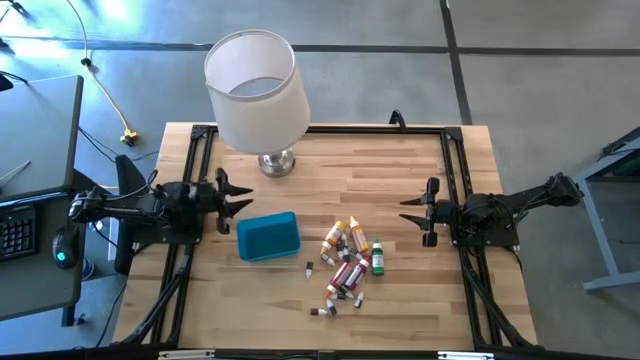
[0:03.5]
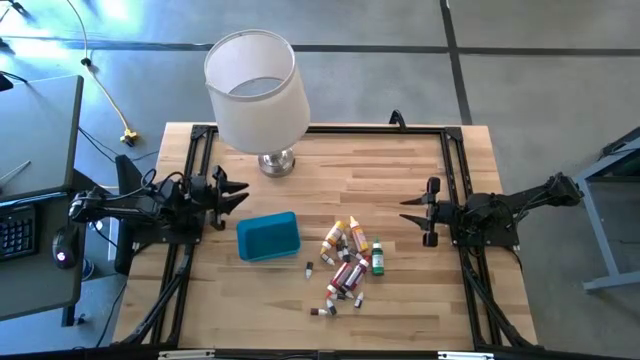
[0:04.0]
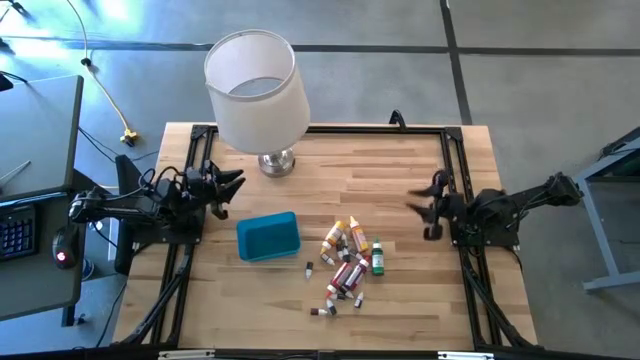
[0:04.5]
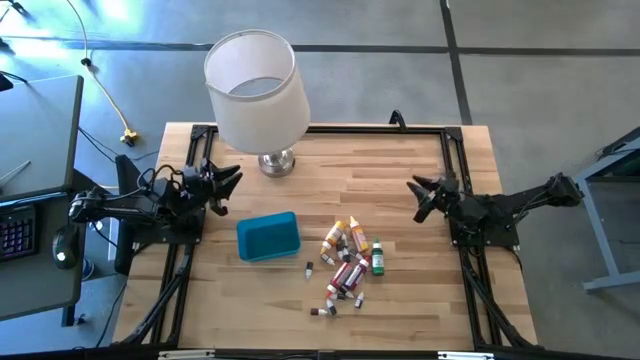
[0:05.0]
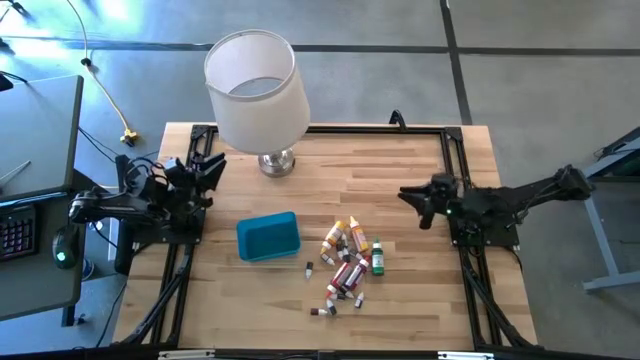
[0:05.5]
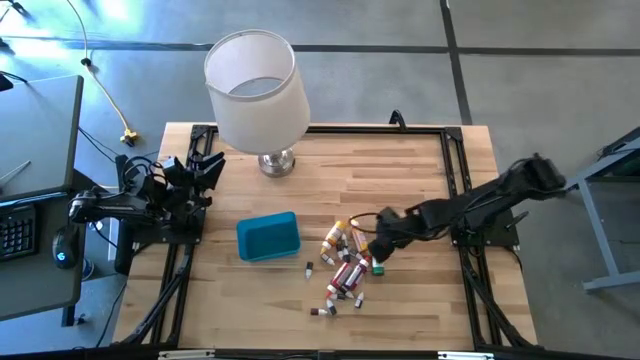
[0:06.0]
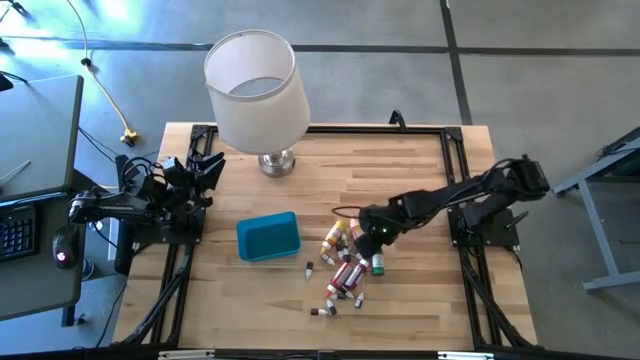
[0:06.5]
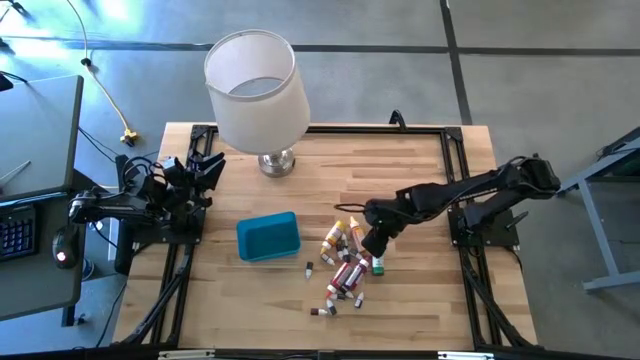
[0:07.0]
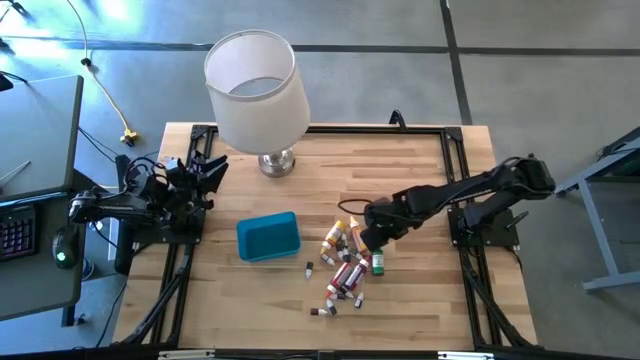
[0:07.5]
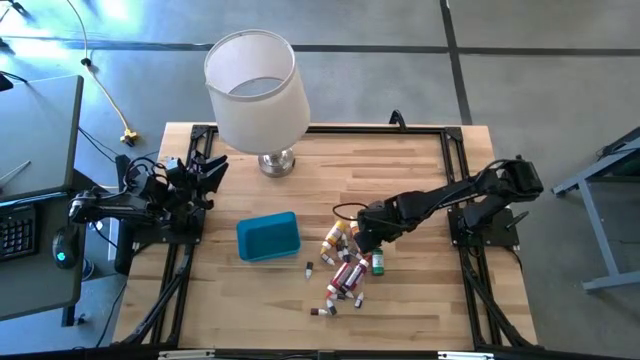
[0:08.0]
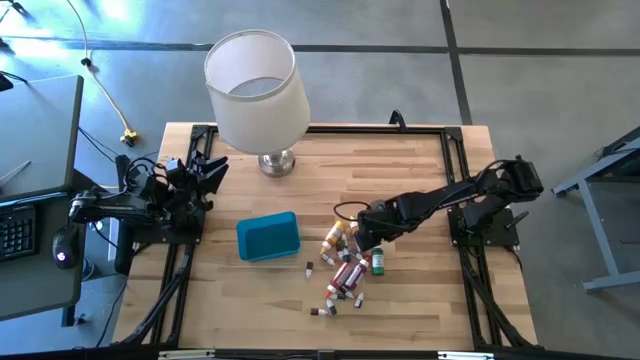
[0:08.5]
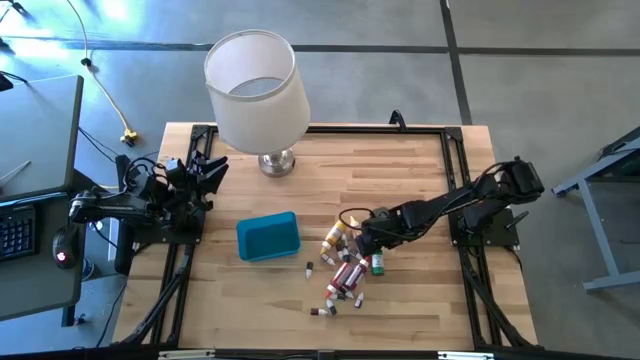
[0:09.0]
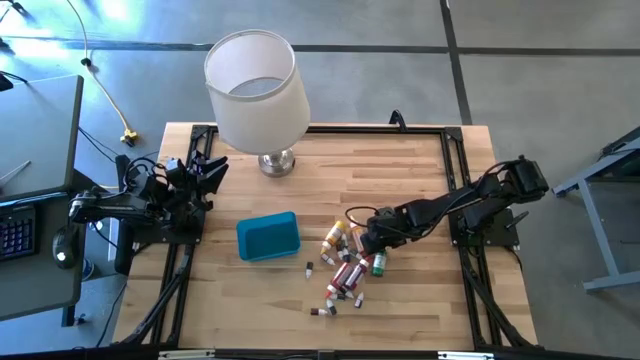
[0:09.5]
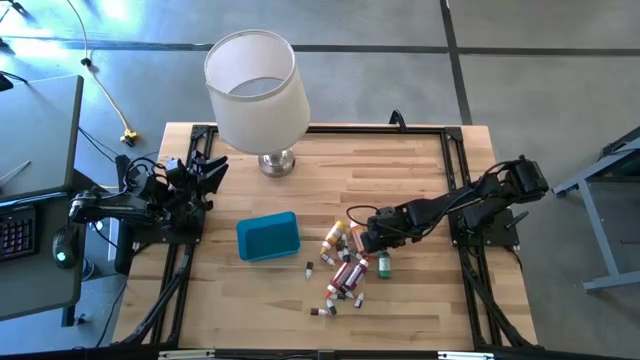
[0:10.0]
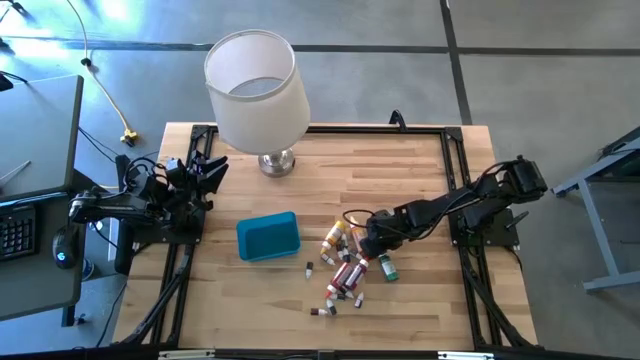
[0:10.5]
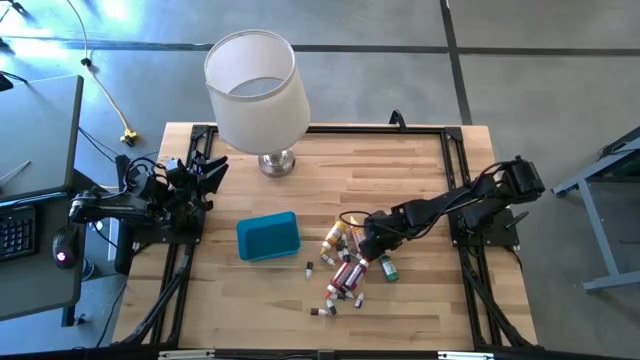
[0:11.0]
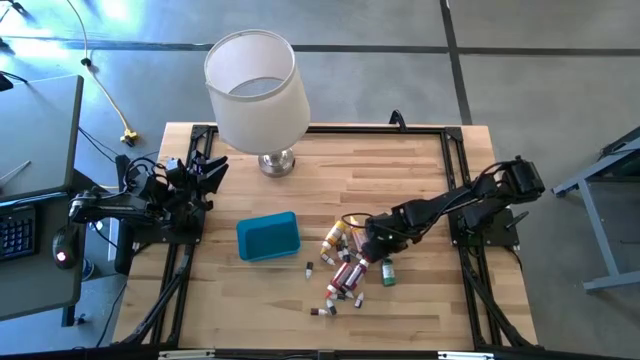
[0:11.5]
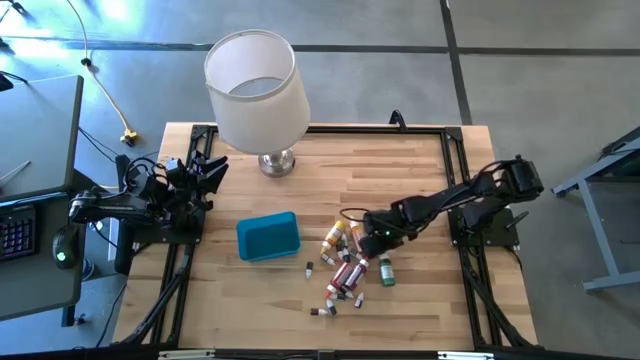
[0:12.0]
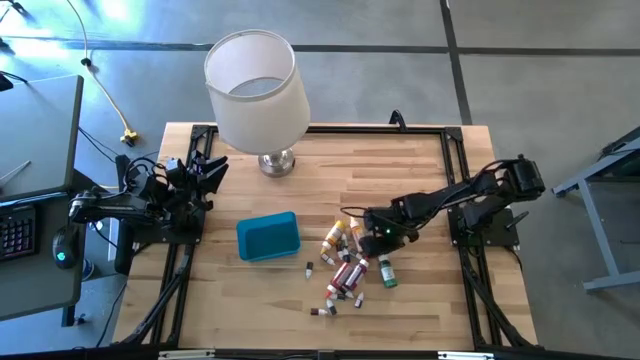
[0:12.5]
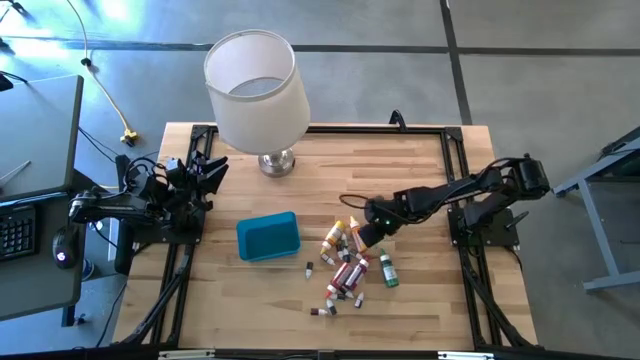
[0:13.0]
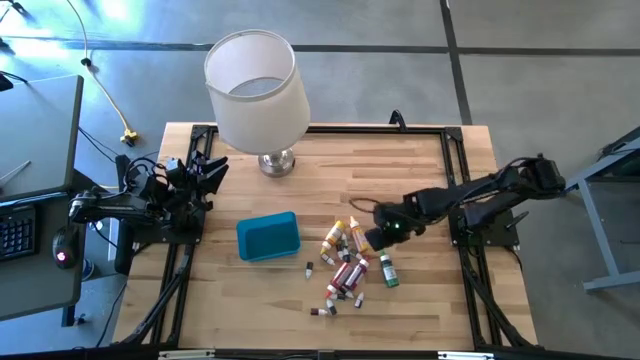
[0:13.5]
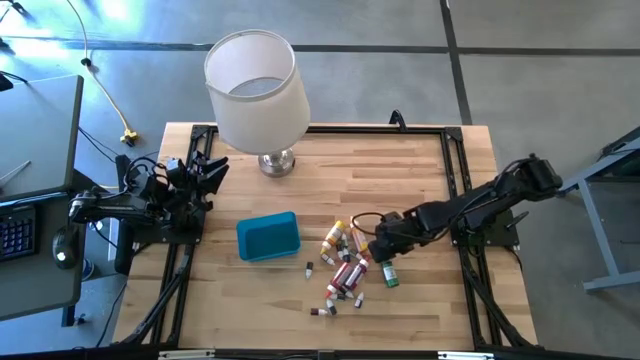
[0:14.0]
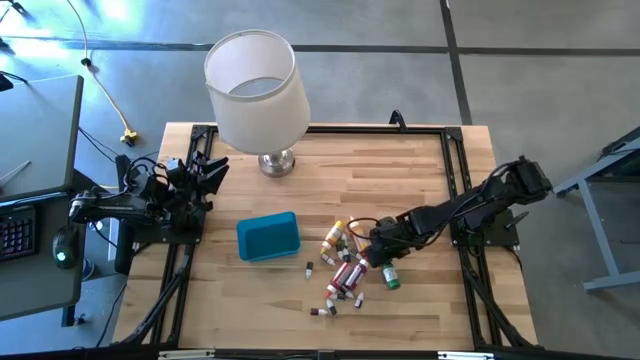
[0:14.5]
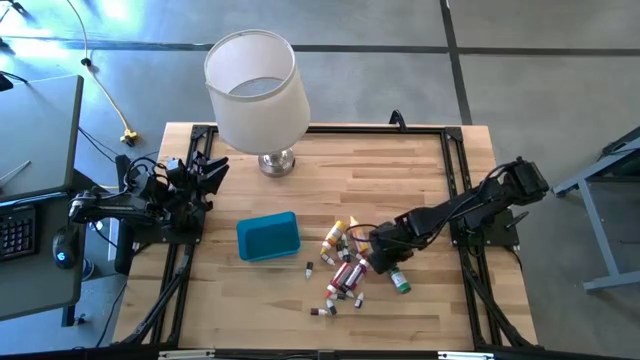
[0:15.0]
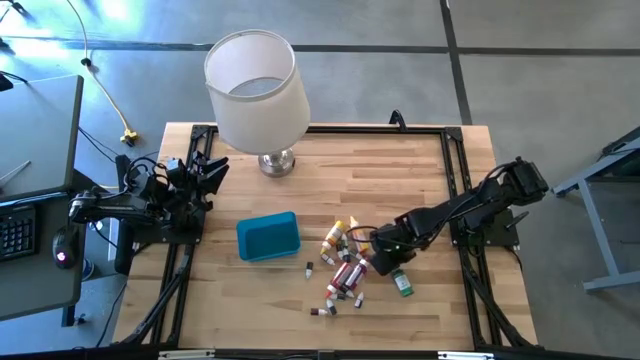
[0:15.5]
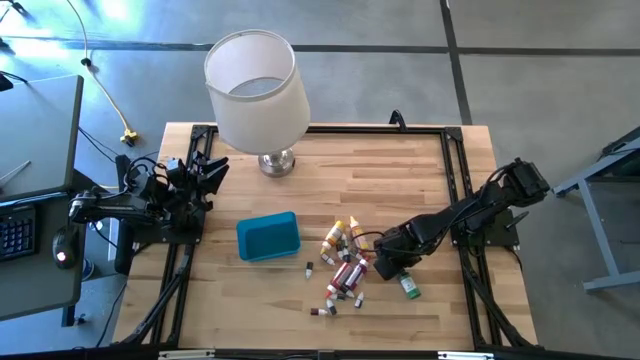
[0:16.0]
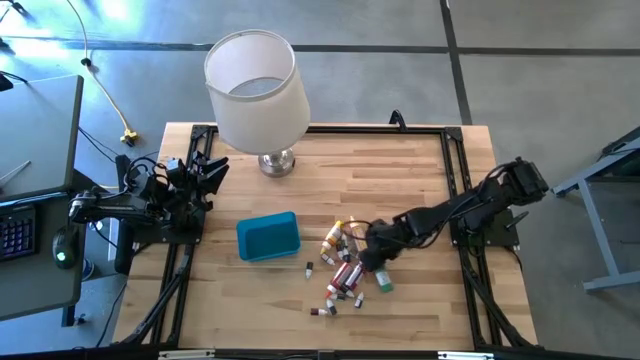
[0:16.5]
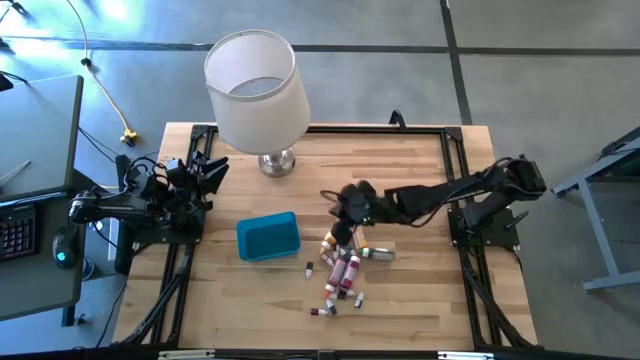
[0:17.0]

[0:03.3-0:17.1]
Task: Pick & Place food coloring
Put the large green food coloring bottle into the blue bin

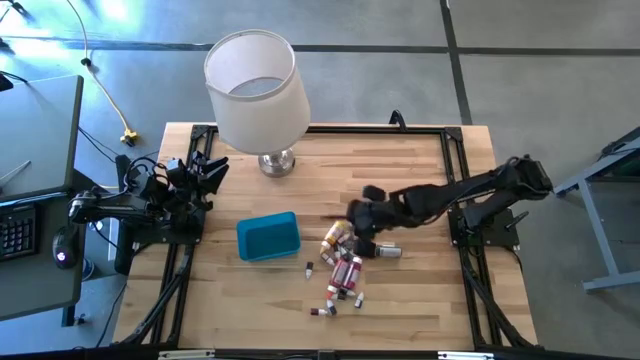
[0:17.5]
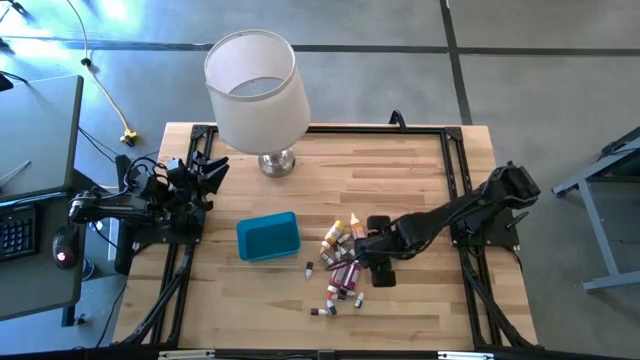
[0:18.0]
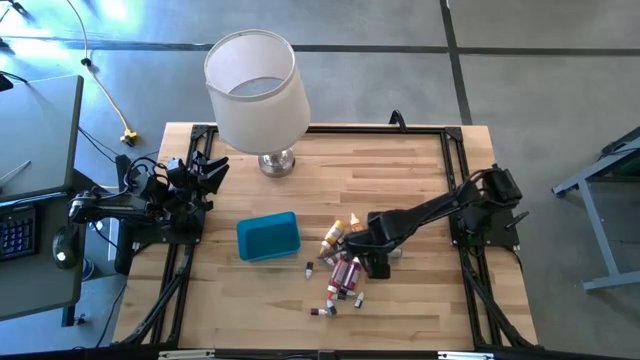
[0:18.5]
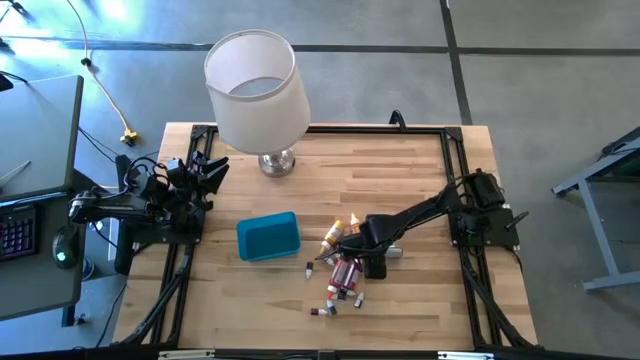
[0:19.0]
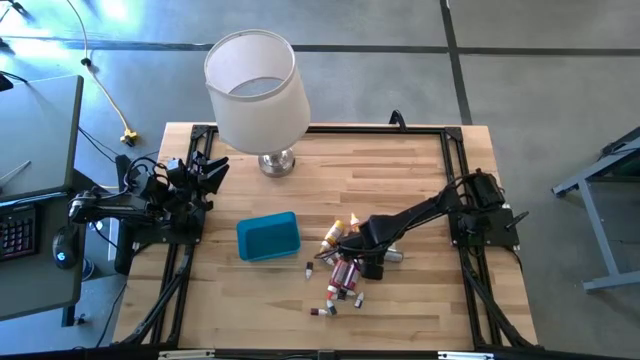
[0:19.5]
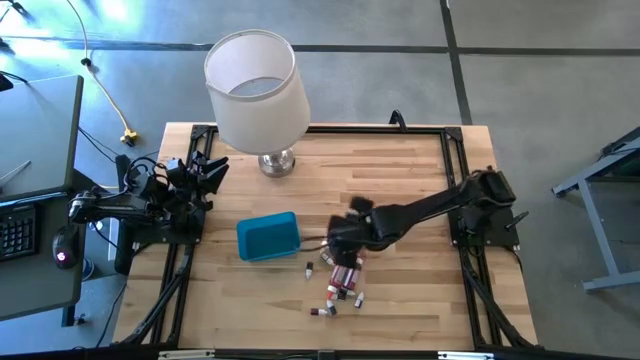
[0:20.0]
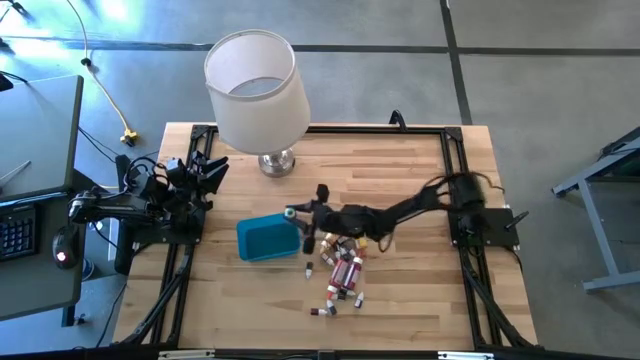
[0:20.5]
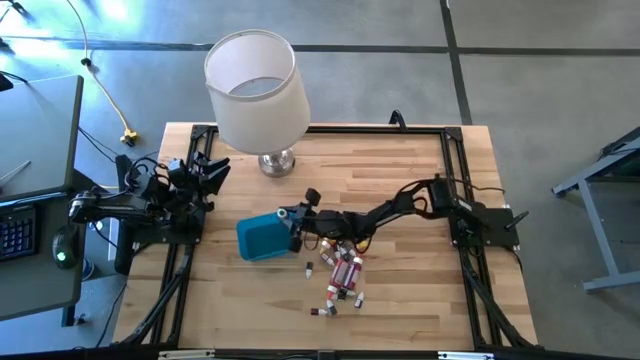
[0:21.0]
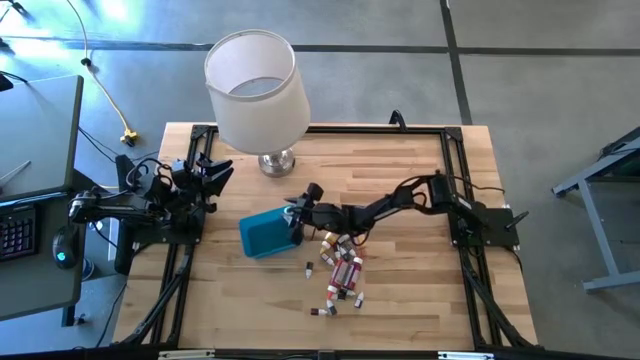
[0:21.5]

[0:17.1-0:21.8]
Put the large green food coloring bottle into the blue bin

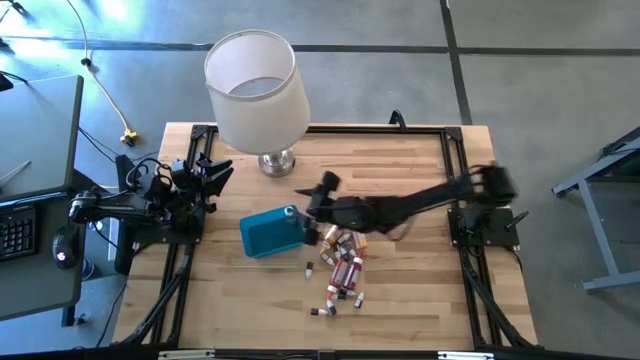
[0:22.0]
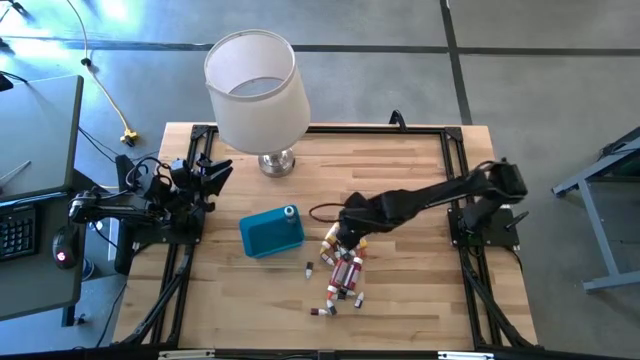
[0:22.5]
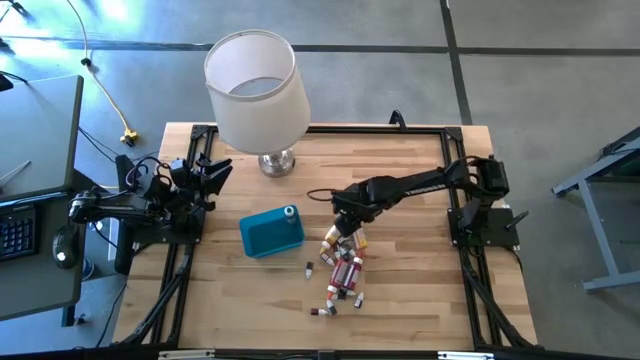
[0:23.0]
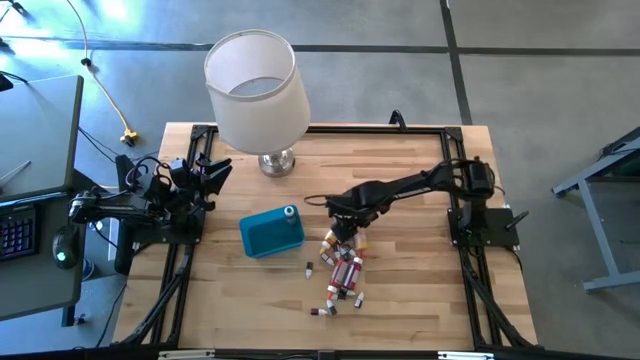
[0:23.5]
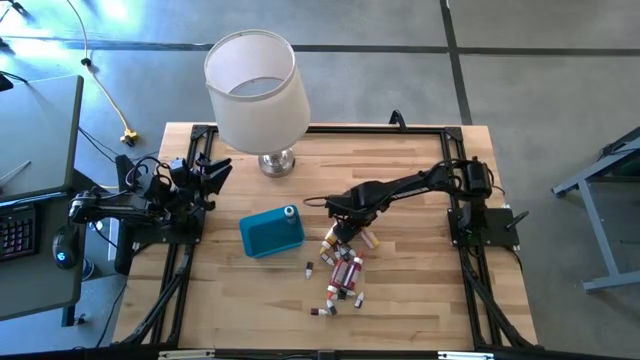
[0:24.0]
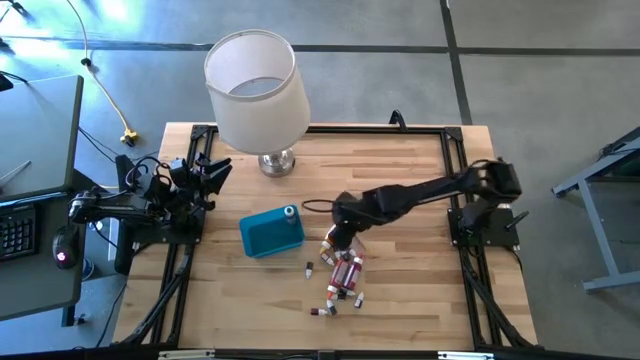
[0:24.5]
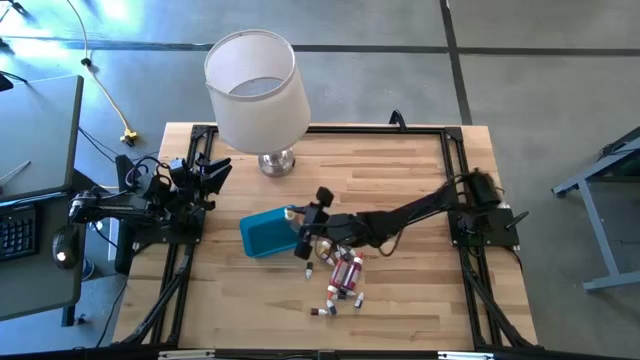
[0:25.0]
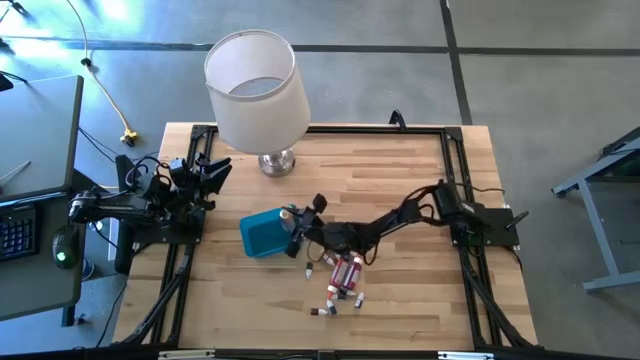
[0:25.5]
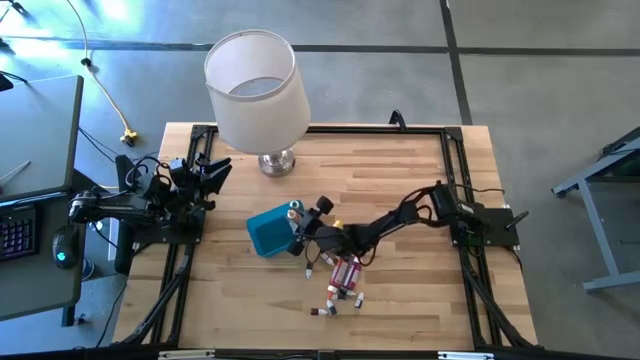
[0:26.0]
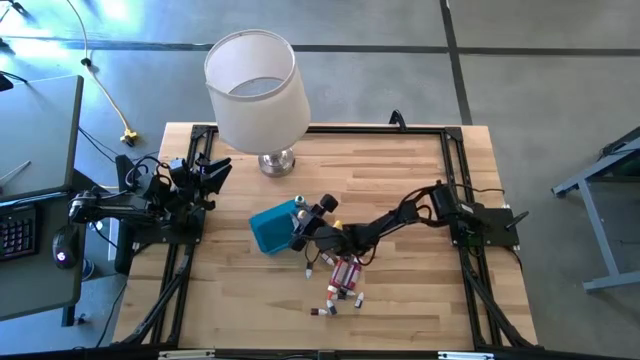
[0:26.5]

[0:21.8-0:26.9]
Put the left large yellow food coloring bottle into the blue bin
